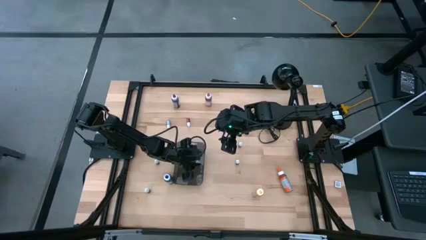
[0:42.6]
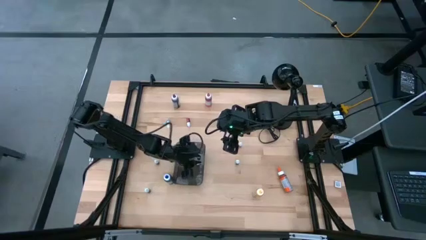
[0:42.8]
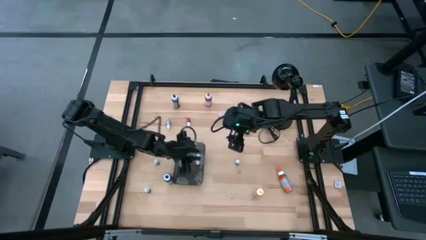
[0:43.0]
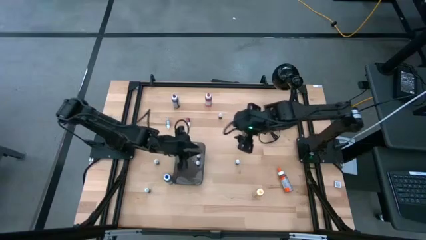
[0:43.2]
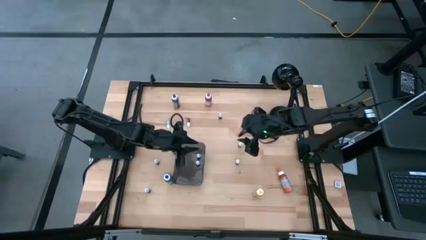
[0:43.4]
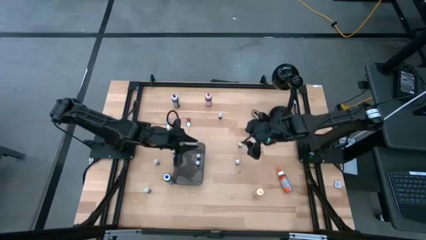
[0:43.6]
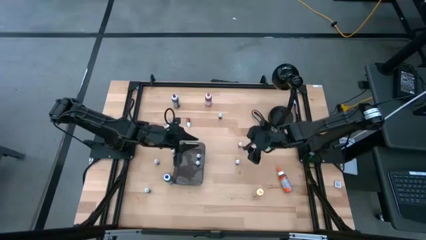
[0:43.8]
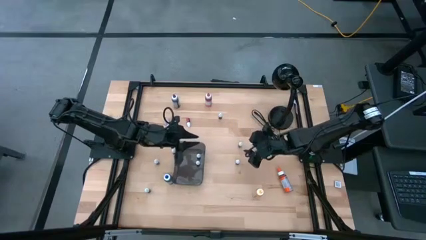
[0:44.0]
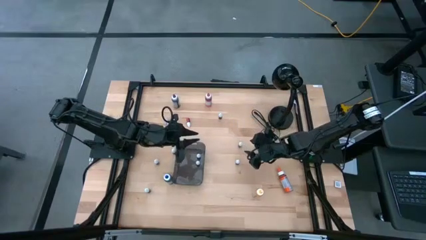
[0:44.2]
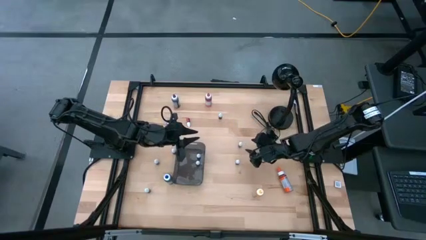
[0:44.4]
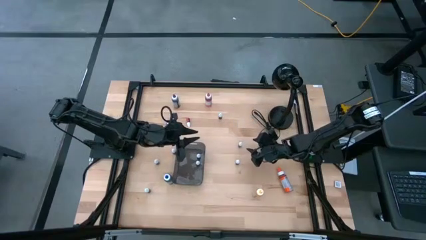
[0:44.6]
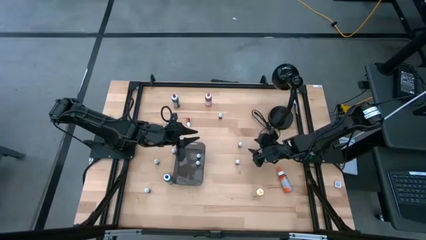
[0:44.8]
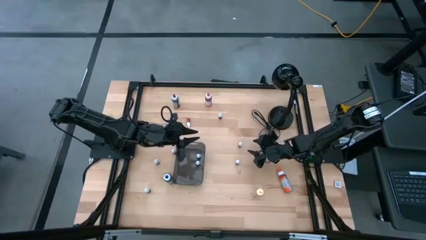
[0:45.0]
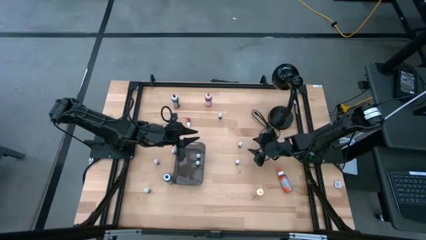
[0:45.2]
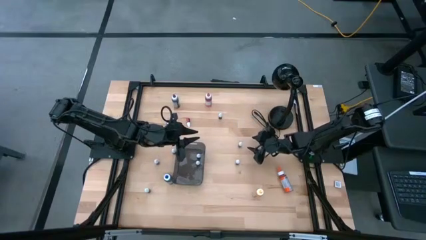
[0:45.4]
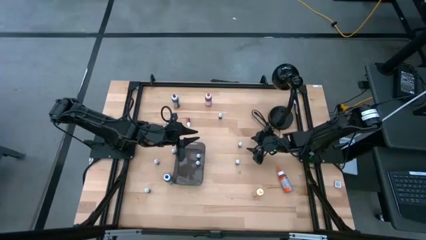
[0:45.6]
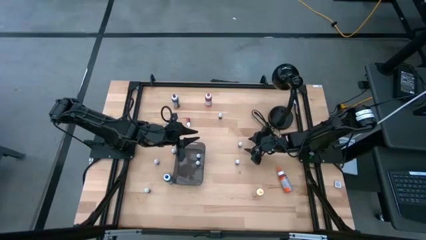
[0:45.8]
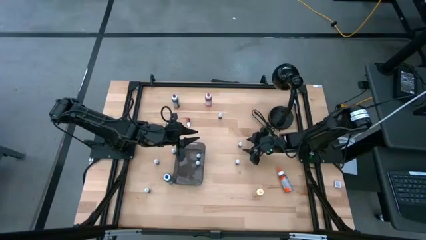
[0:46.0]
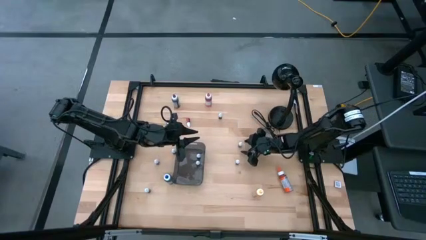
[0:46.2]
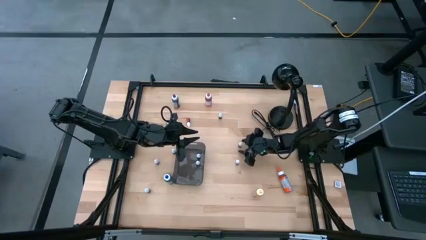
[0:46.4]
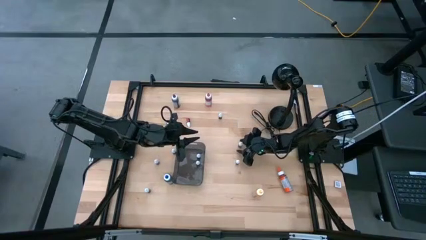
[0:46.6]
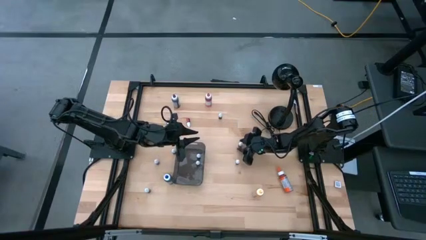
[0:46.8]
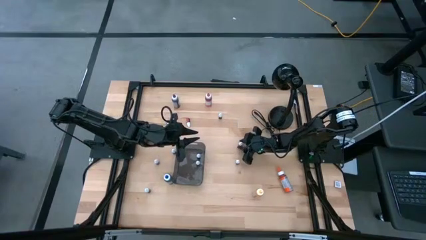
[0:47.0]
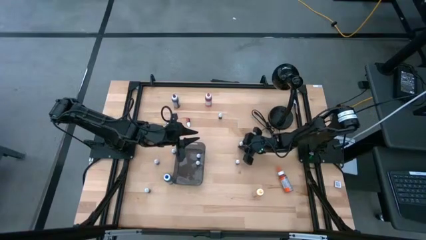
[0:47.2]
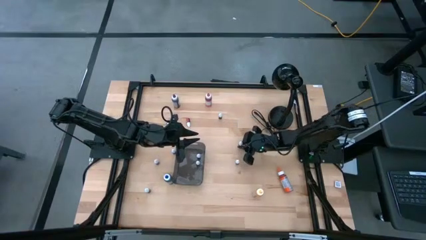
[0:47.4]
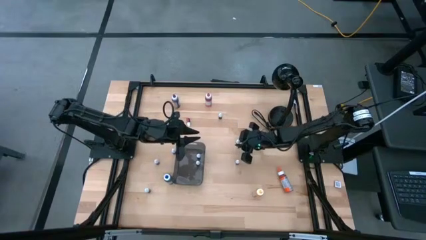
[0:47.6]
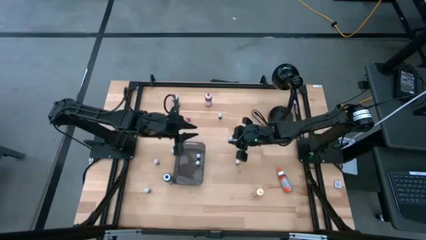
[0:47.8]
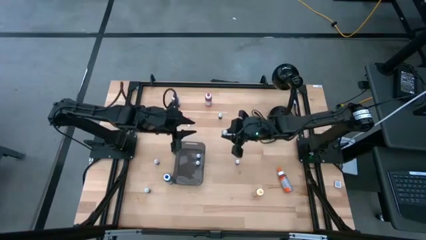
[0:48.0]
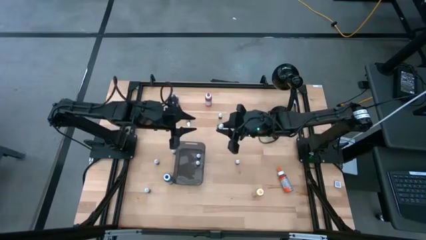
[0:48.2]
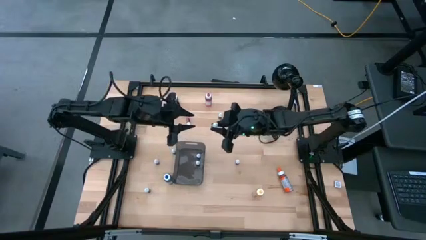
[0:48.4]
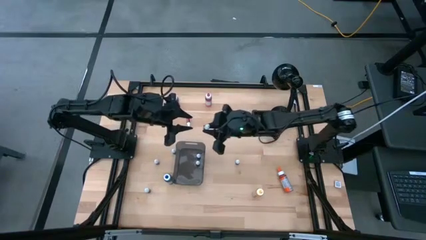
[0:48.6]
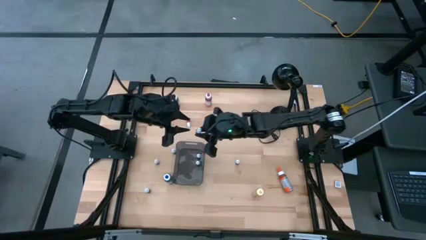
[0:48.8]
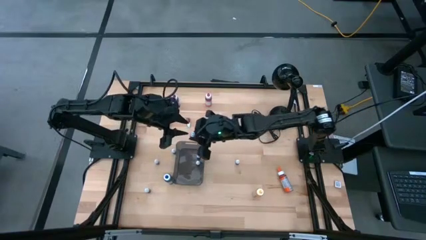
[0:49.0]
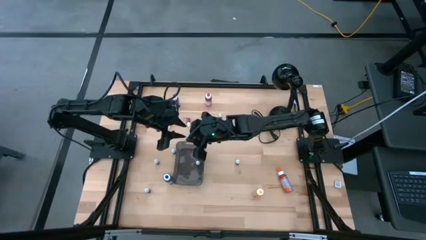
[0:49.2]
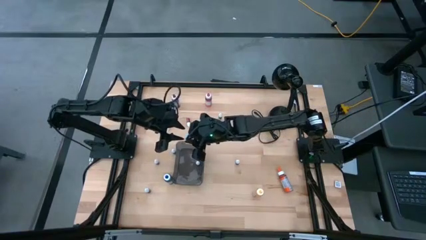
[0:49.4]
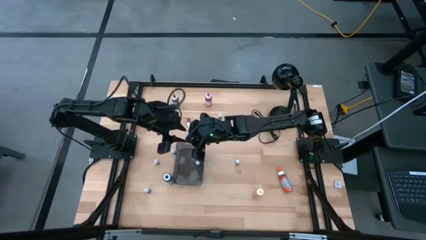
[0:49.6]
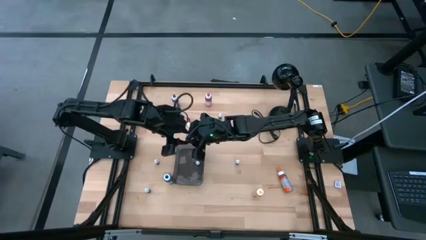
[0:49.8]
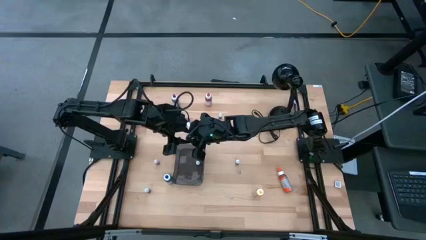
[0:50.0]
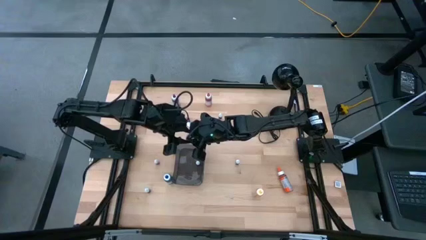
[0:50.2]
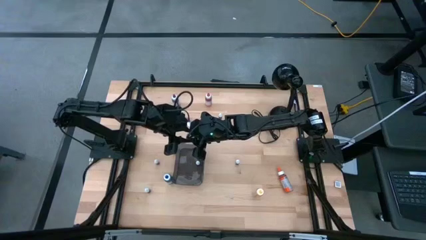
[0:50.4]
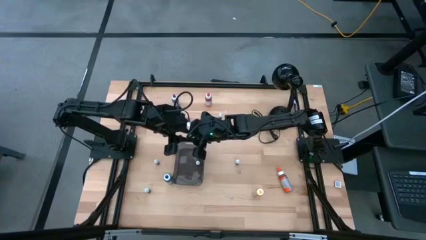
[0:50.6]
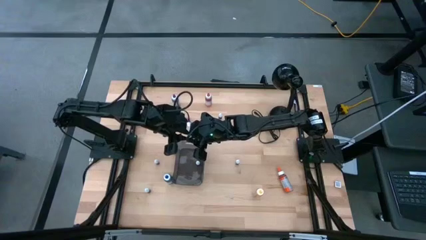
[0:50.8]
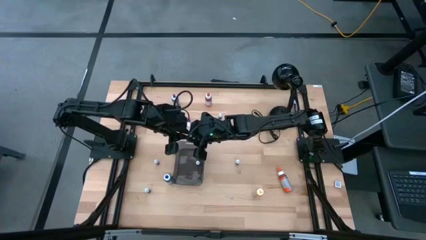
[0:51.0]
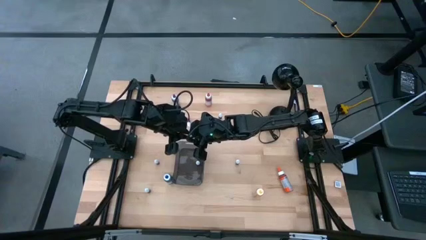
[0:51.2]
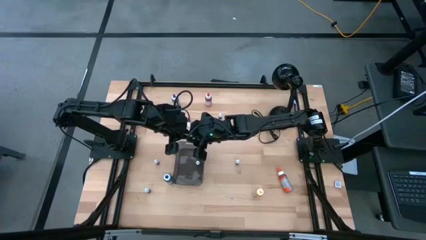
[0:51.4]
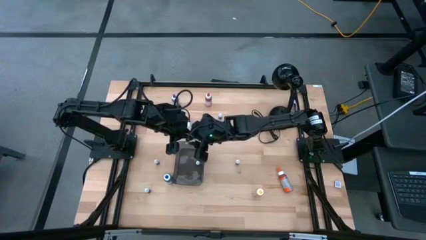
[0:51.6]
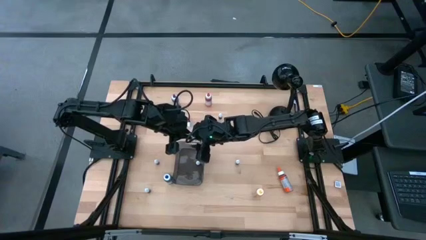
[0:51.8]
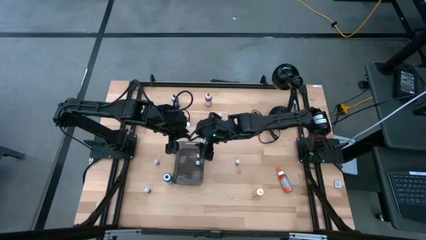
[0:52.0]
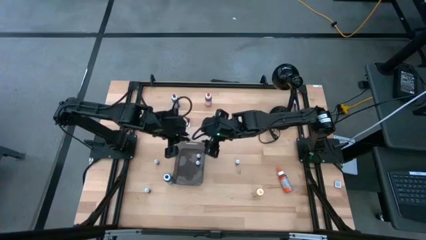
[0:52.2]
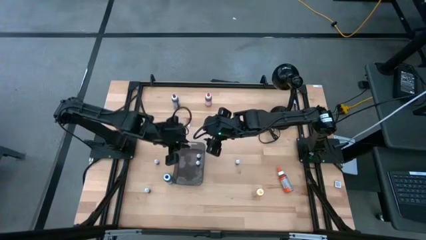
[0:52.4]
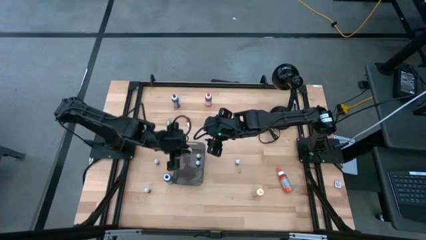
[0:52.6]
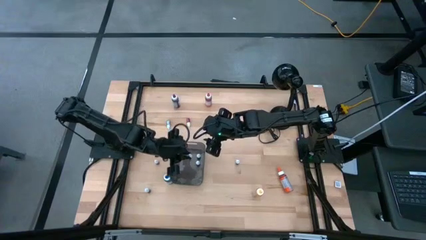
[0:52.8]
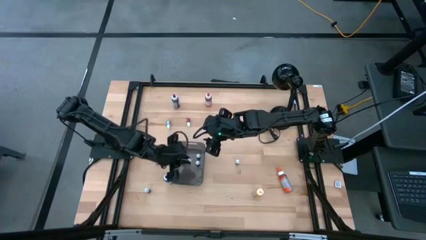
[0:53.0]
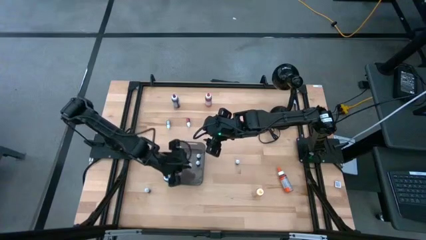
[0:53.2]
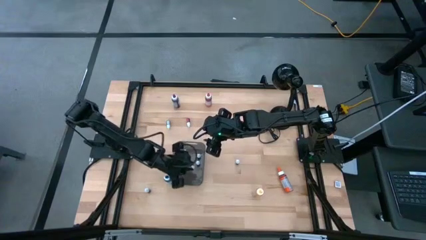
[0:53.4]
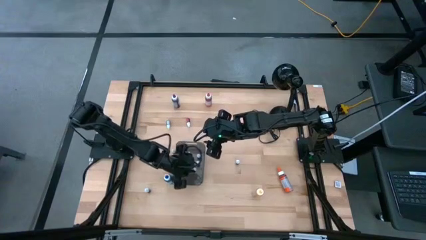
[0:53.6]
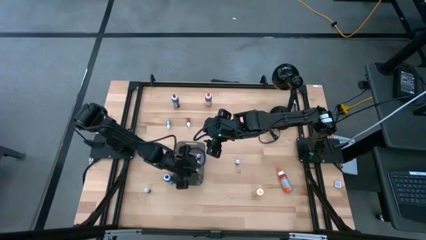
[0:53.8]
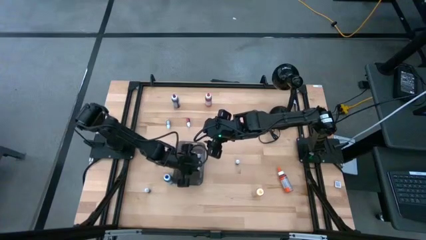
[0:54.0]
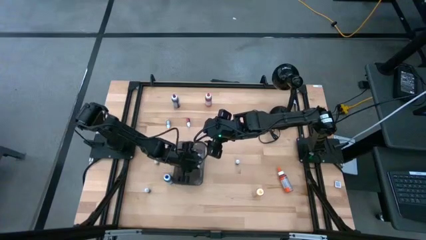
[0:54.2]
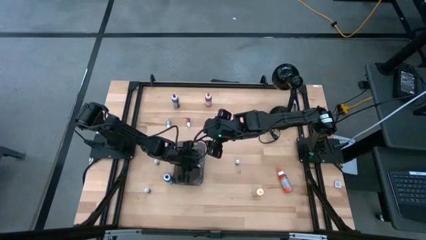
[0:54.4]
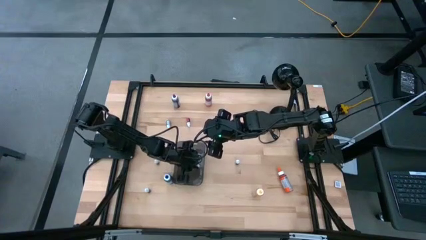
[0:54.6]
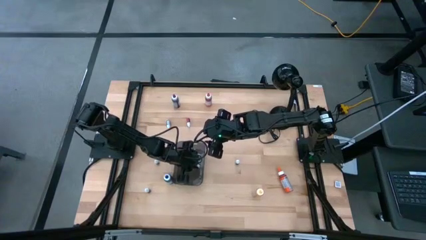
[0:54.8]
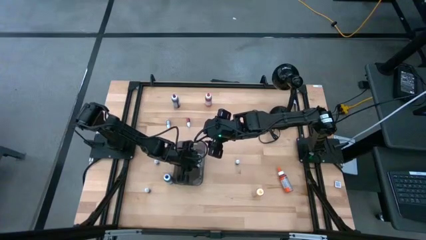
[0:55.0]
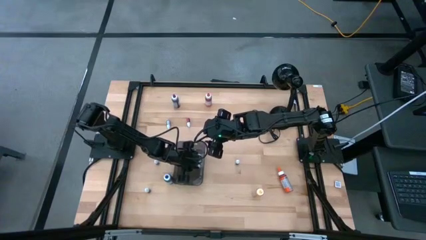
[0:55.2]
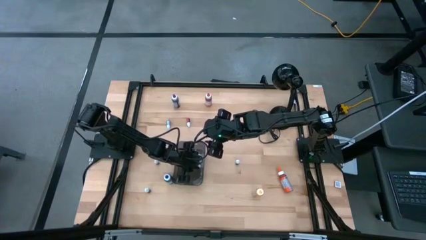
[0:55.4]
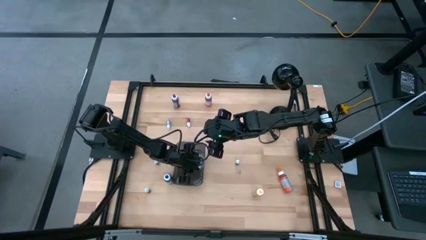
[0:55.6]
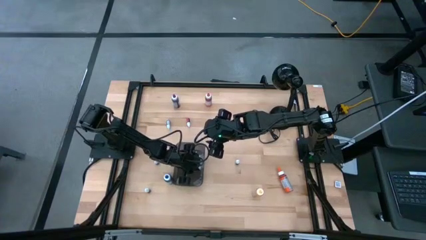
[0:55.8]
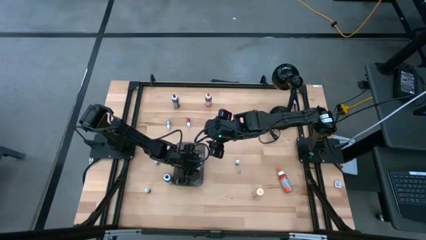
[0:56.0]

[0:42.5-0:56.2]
Task: Pick & Place food coloring
Put the top red food coloring bottle into the bin
